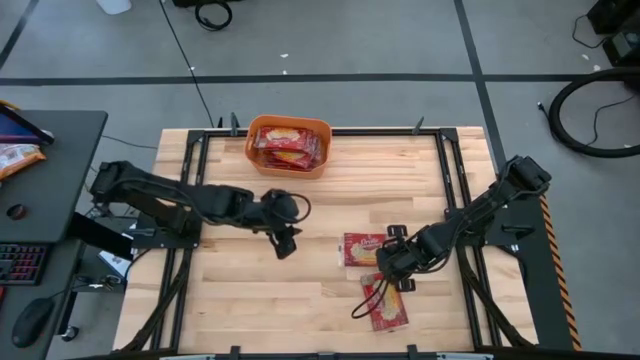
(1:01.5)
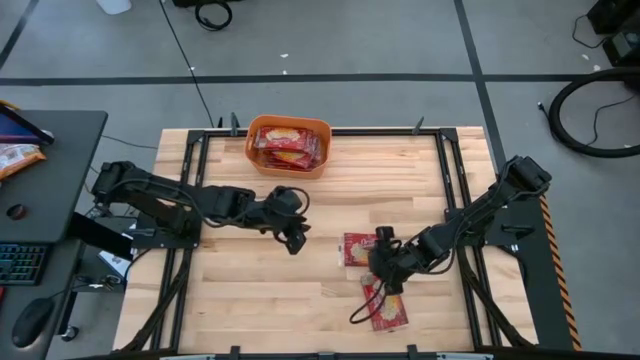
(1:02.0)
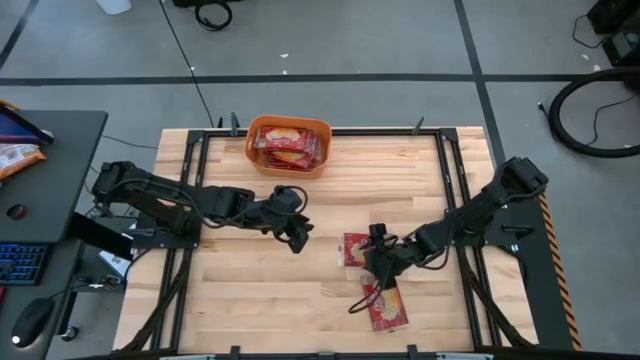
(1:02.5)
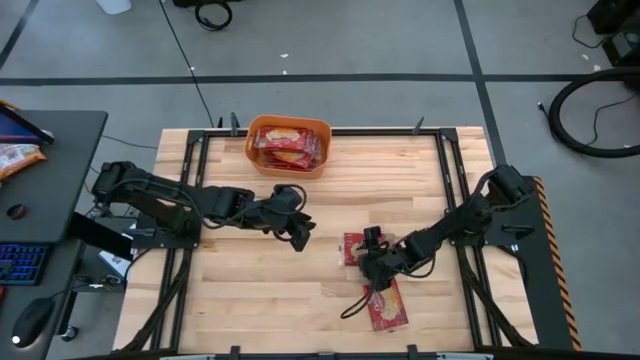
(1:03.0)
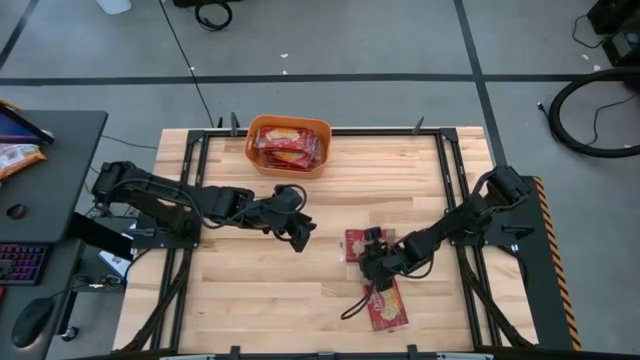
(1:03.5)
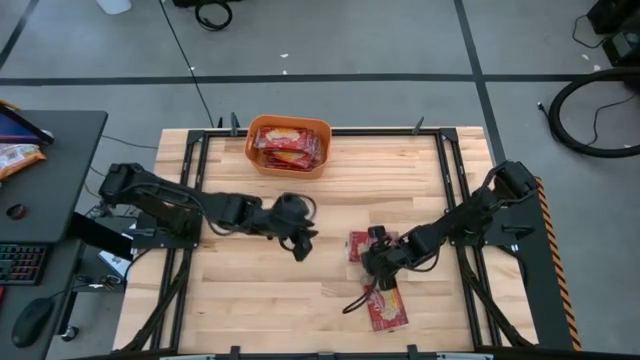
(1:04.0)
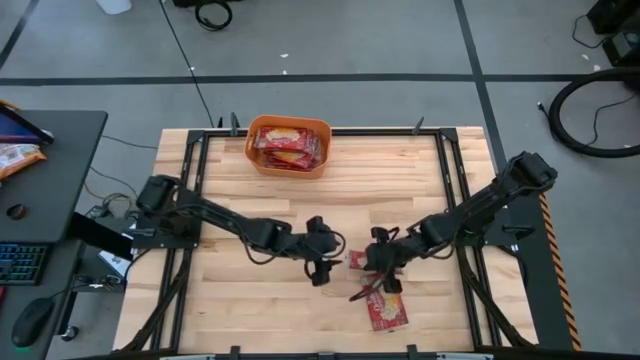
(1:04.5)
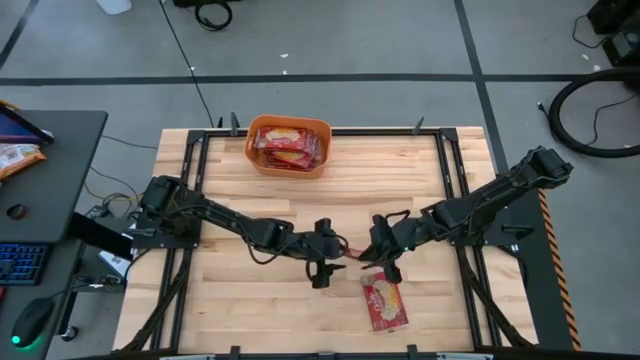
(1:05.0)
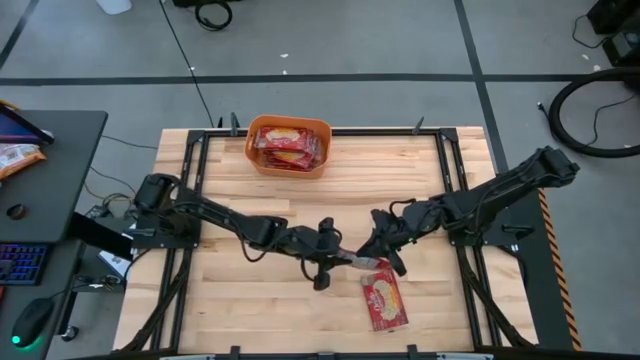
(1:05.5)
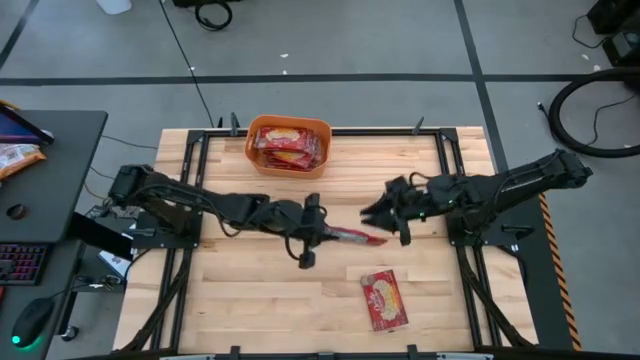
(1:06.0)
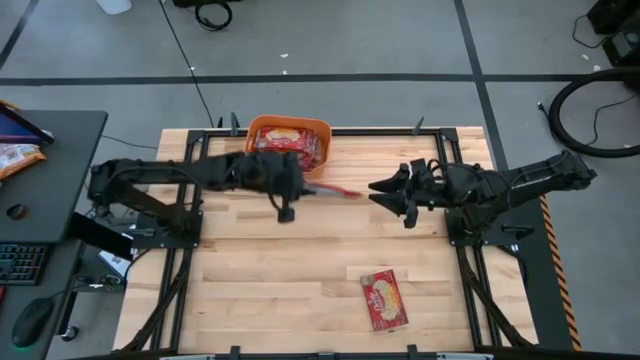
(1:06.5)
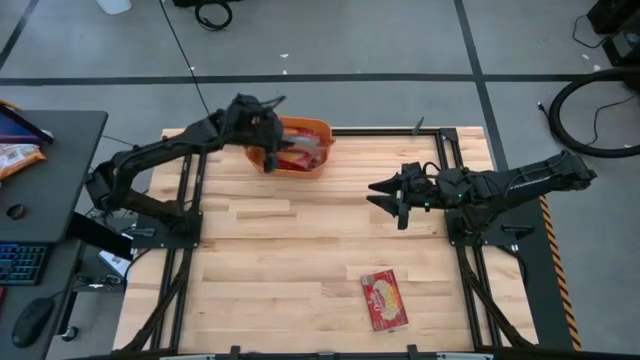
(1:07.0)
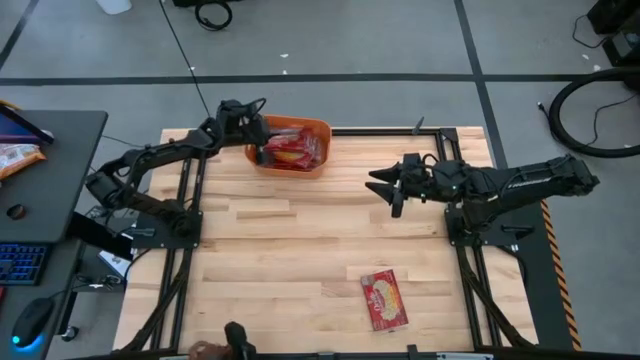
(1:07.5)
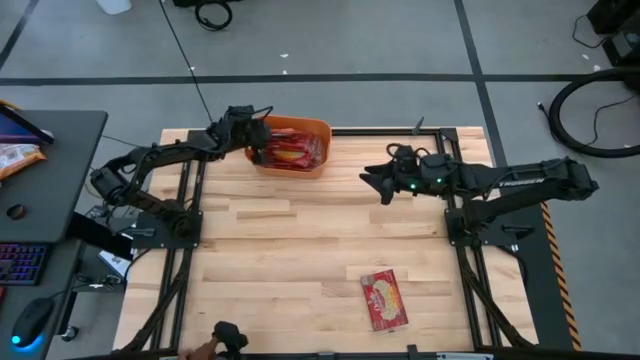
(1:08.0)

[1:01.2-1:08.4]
Task: Sort popcorn bags into baskets
Put the red popcorn bag into the orange container

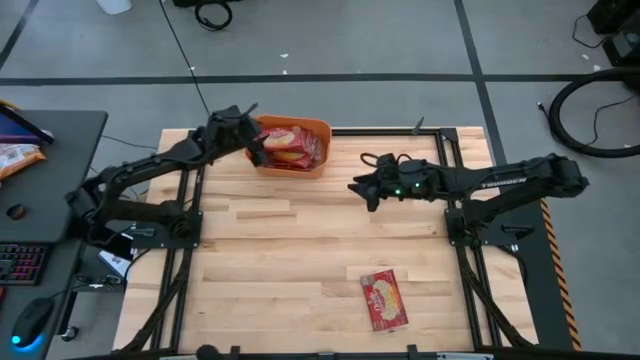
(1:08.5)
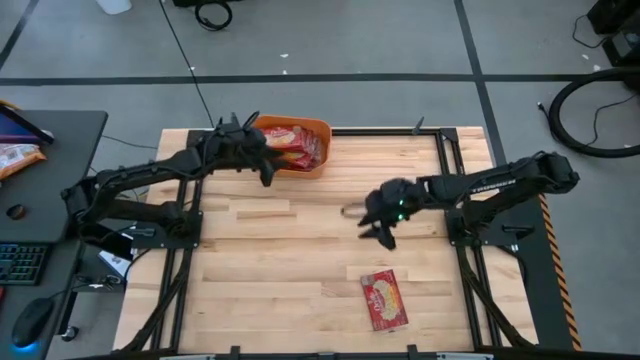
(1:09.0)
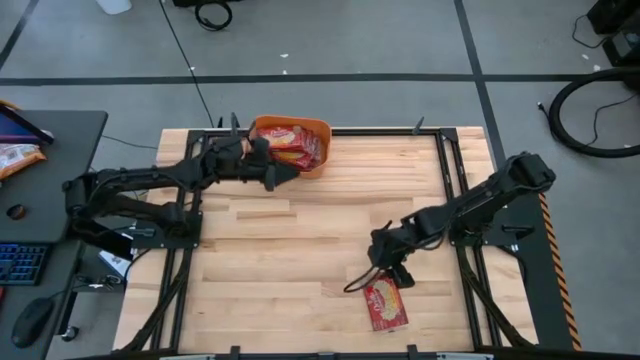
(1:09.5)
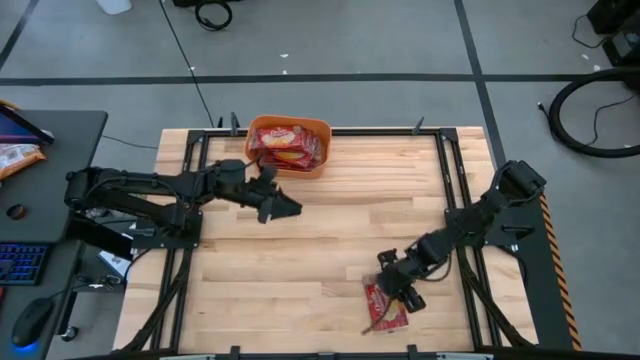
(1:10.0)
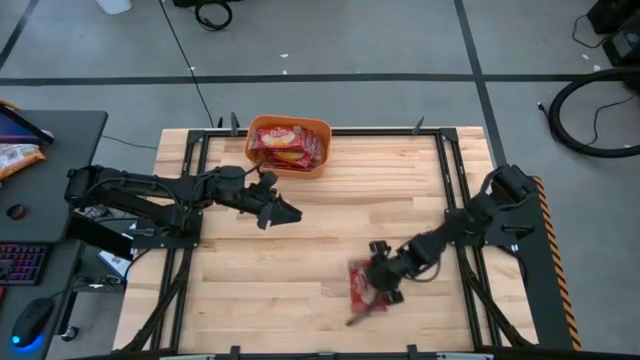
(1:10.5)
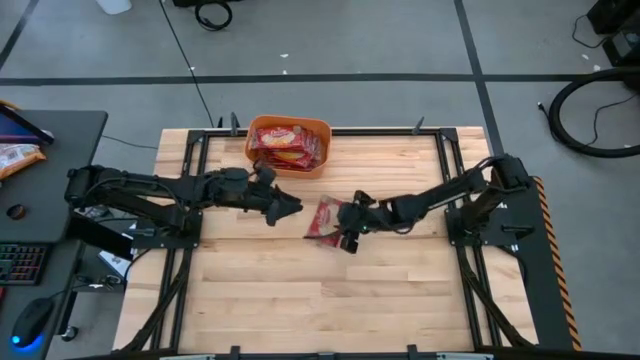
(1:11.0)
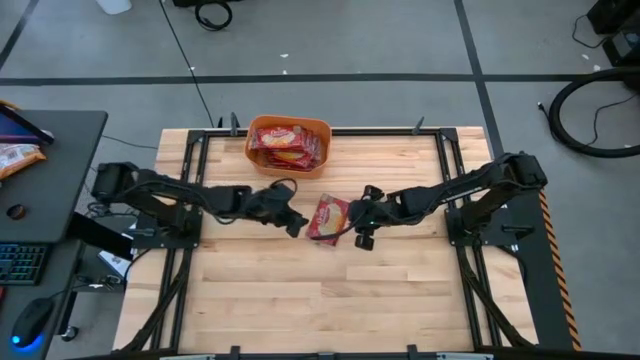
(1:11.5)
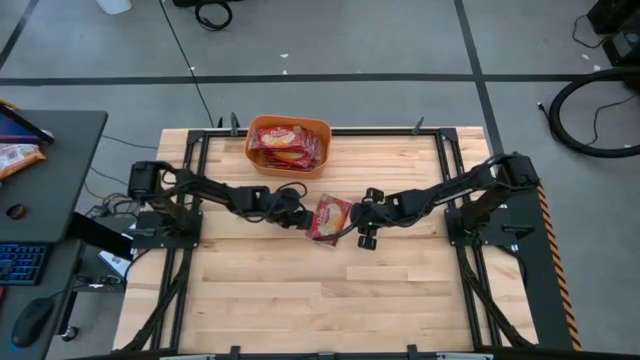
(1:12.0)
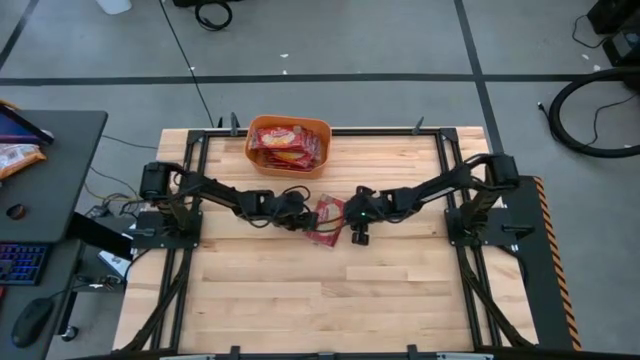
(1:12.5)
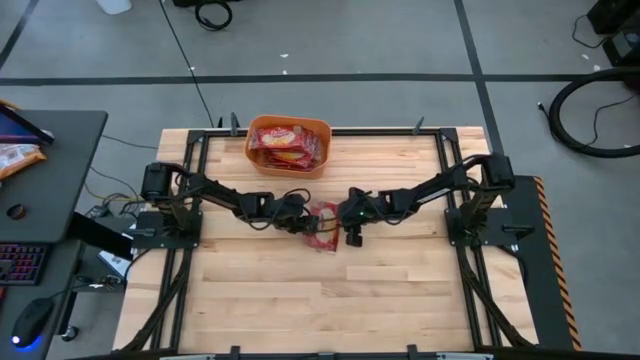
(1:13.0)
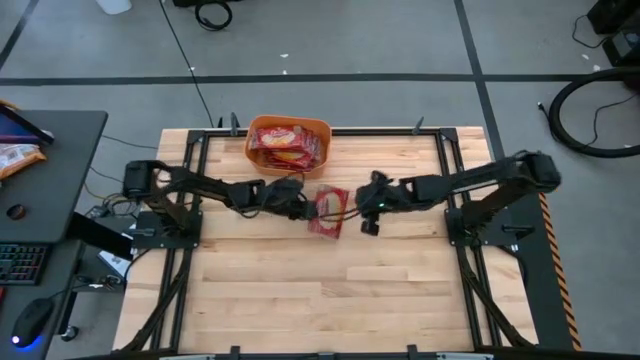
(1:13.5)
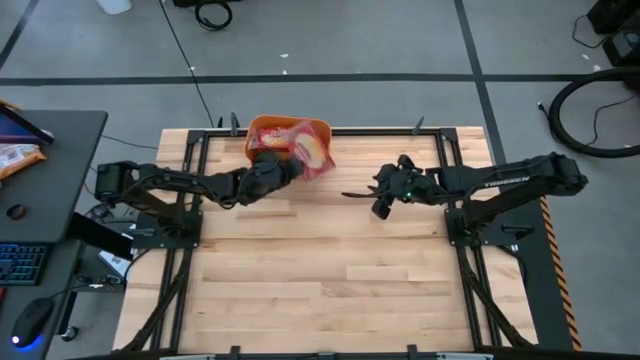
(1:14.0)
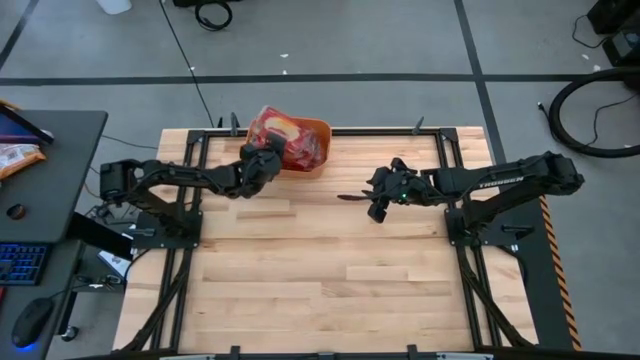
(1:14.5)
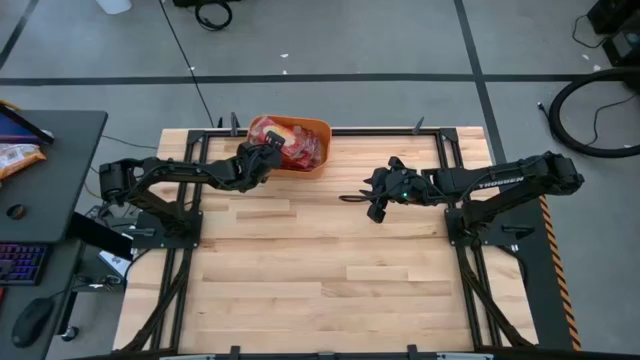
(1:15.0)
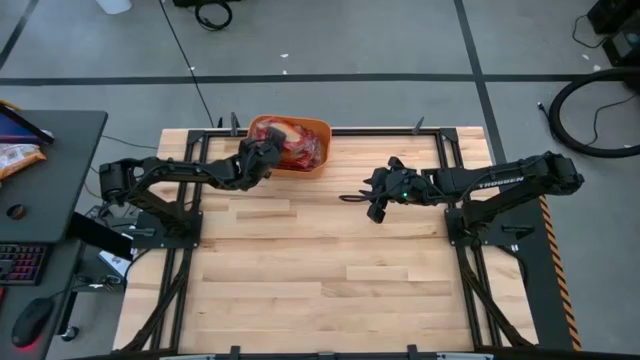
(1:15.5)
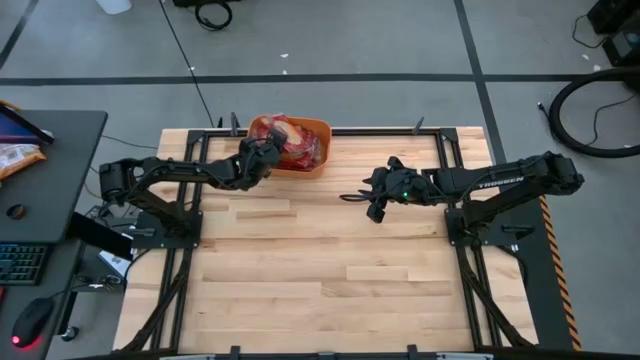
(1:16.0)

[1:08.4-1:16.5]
Put the red popcorn bag into the orange container

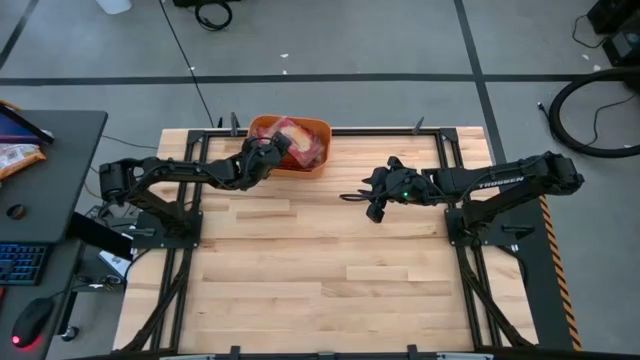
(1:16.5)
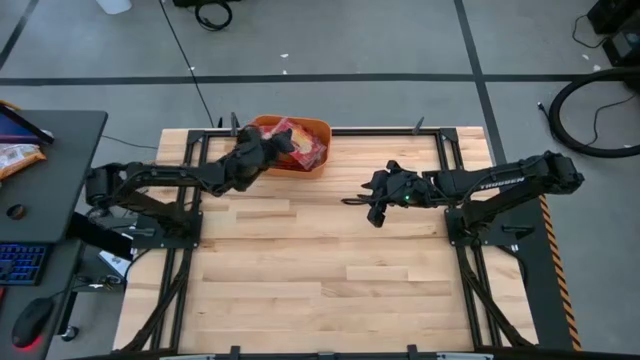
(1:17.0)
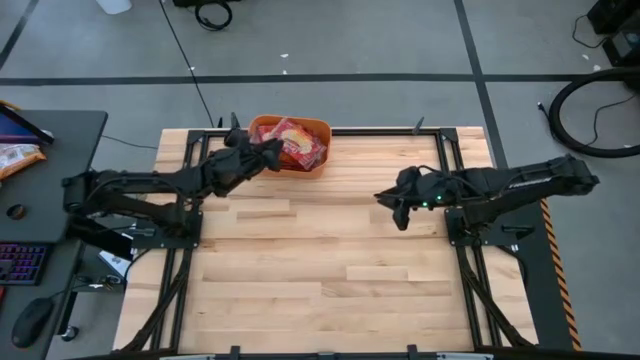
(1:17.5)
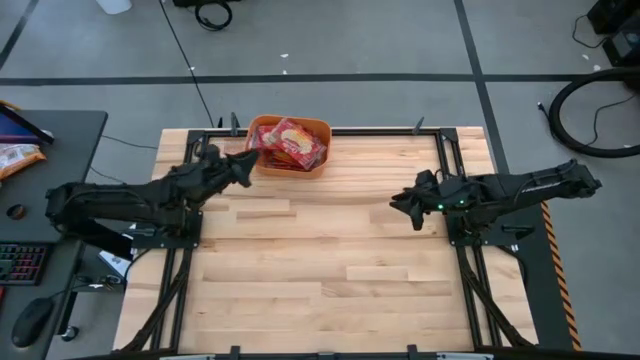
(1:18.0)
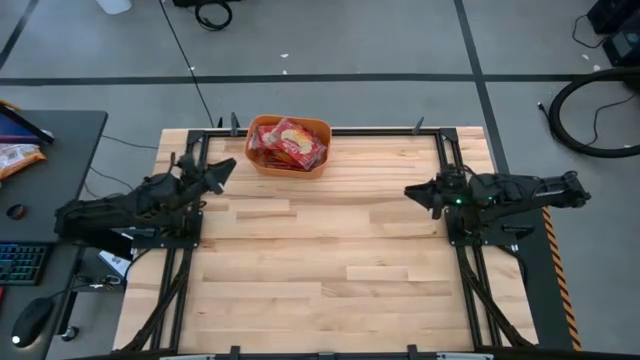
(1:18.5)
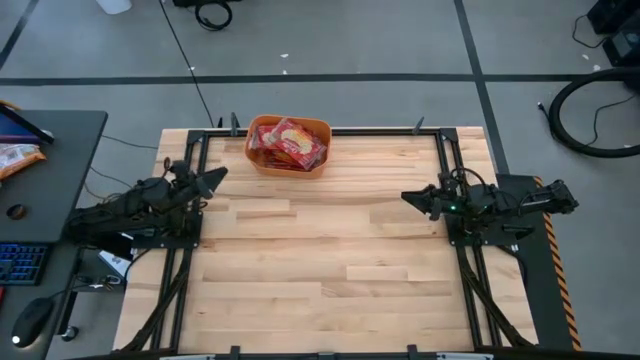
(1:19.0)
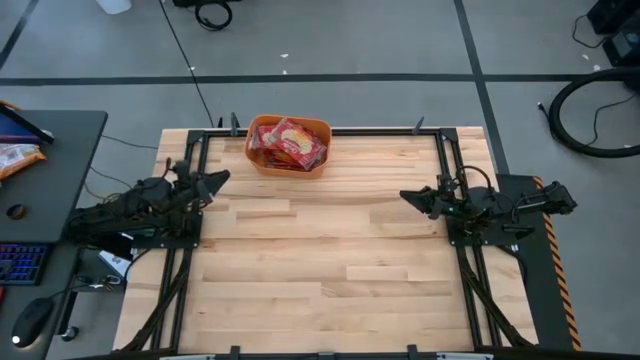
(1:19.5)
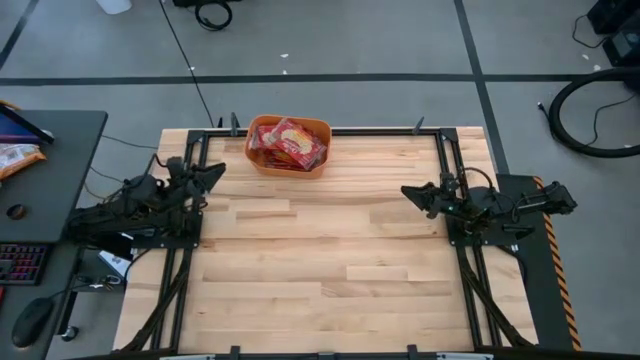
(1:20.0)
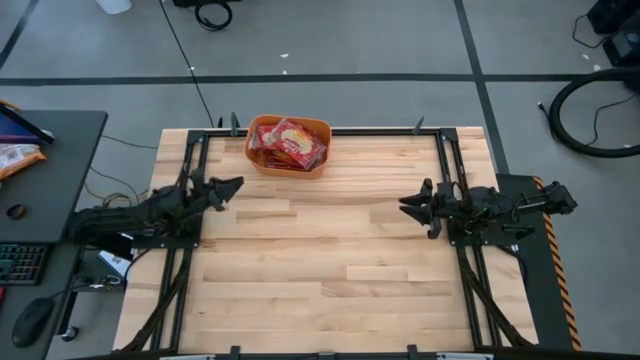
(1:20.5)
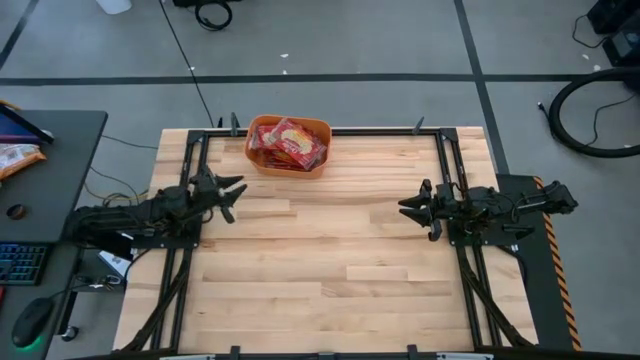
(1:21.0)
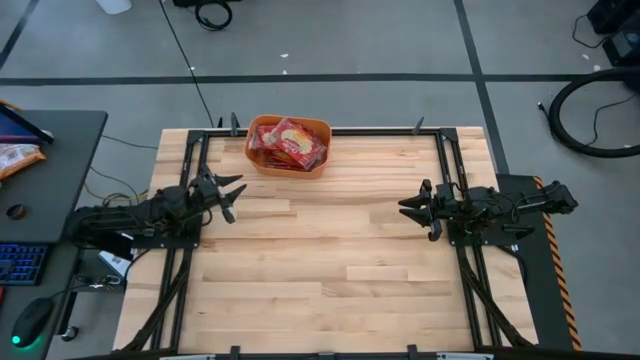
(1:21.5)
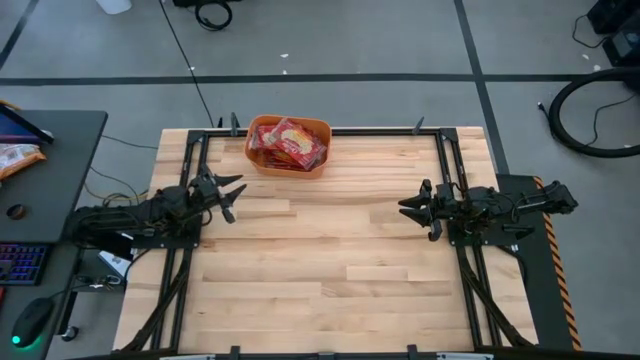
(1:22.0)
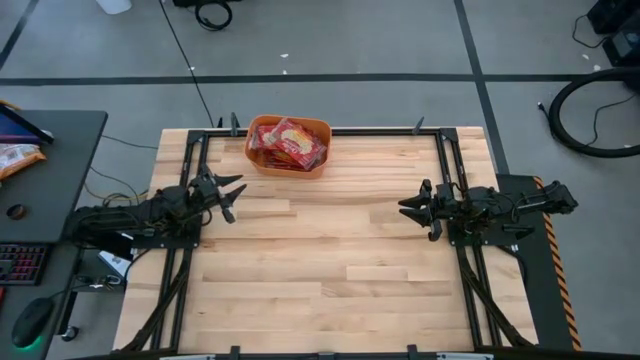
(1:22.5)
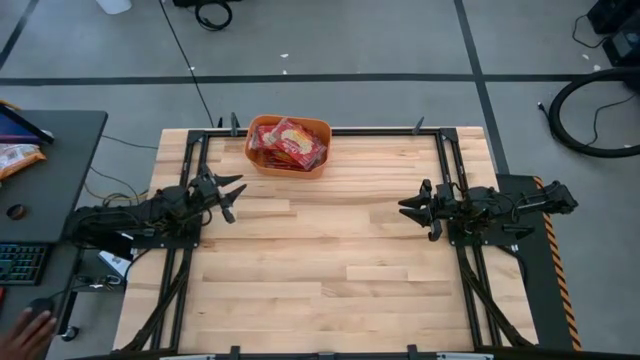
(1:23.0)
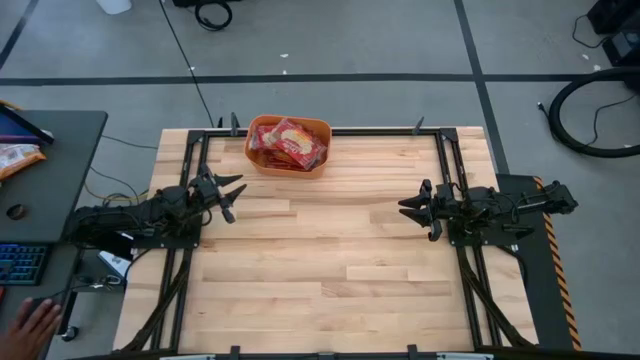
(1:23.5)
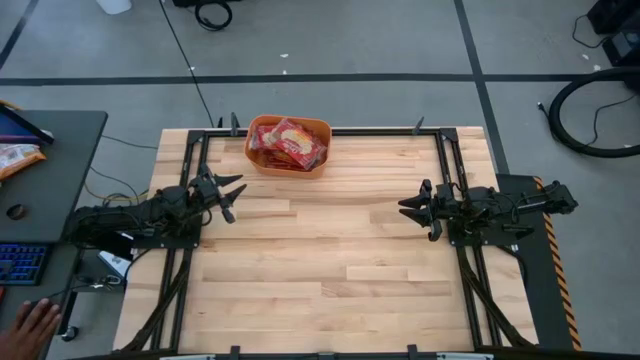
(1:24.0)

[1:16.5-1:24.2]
Return to Home Position
